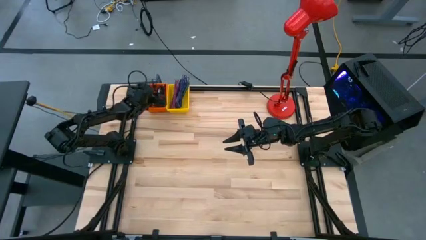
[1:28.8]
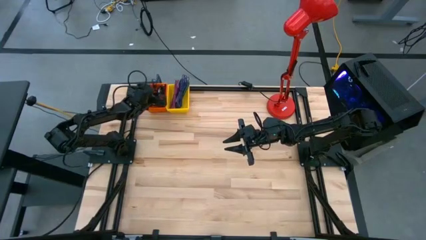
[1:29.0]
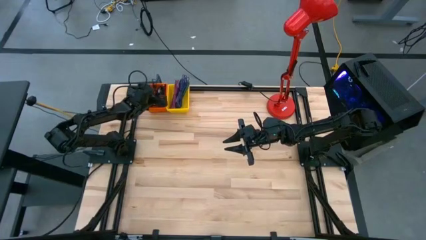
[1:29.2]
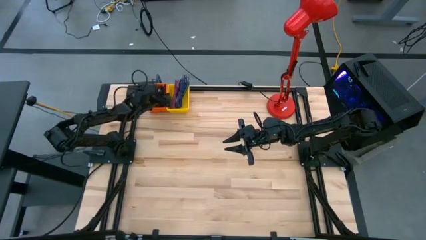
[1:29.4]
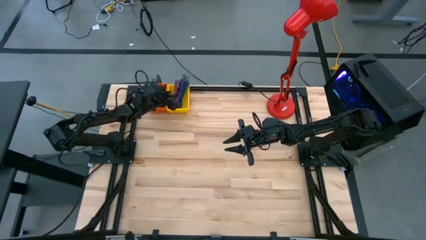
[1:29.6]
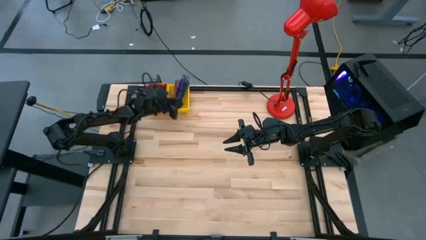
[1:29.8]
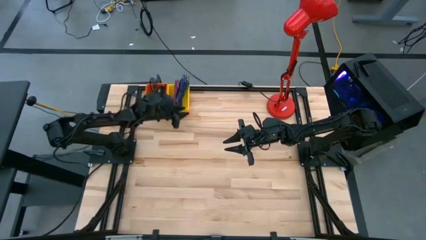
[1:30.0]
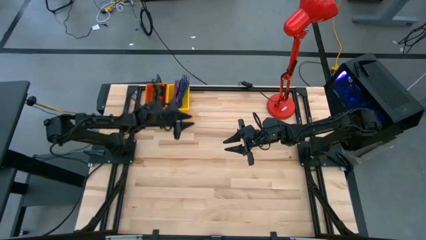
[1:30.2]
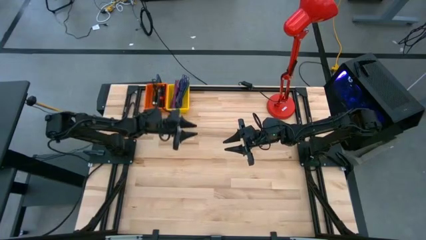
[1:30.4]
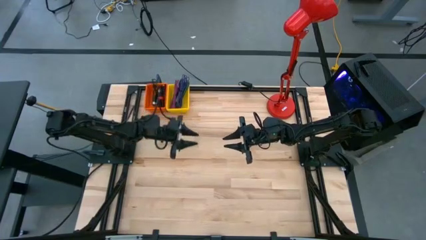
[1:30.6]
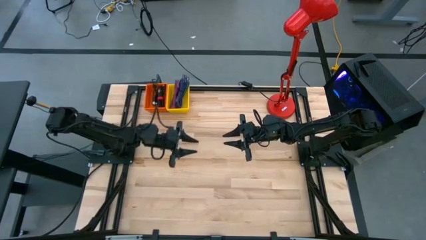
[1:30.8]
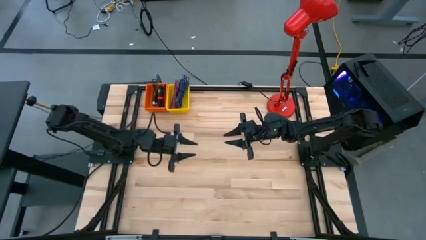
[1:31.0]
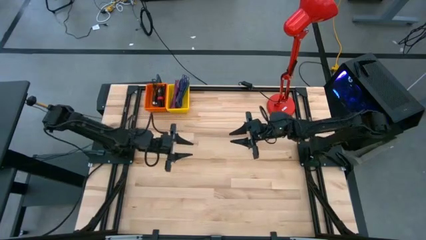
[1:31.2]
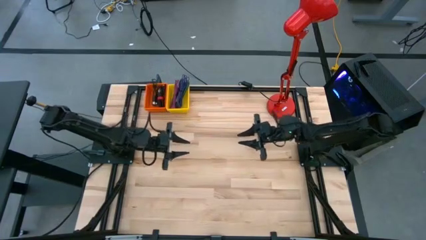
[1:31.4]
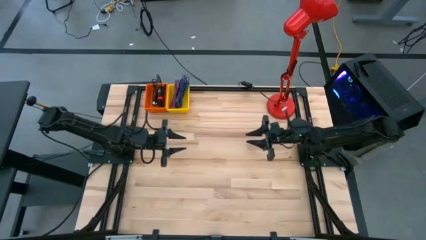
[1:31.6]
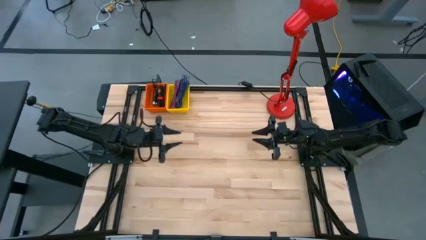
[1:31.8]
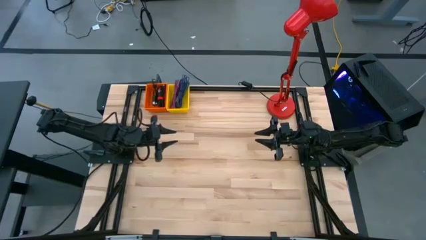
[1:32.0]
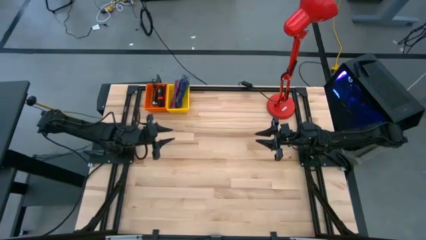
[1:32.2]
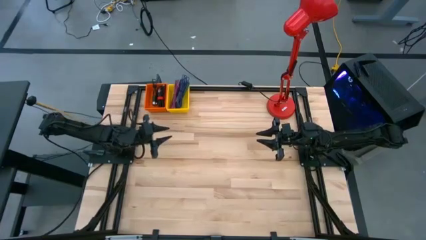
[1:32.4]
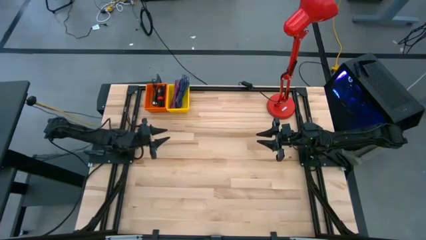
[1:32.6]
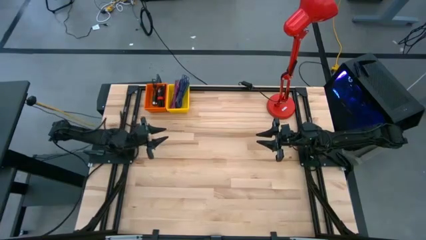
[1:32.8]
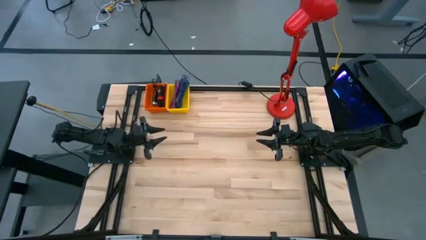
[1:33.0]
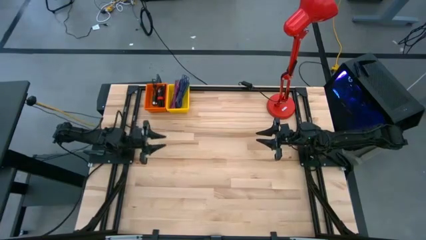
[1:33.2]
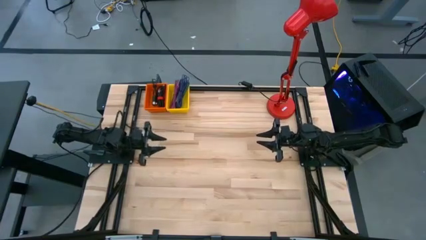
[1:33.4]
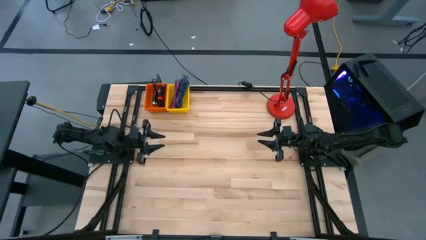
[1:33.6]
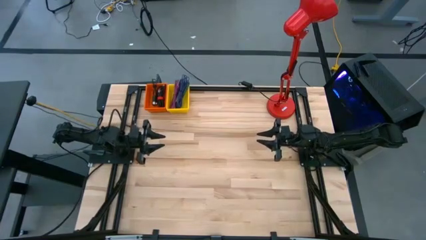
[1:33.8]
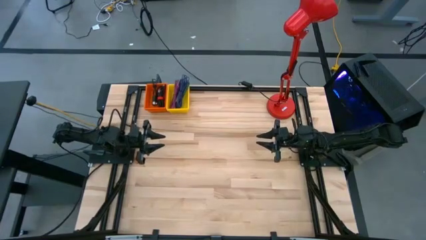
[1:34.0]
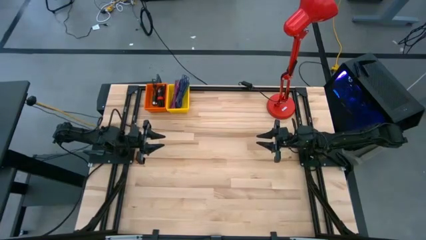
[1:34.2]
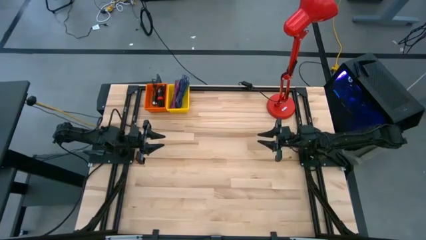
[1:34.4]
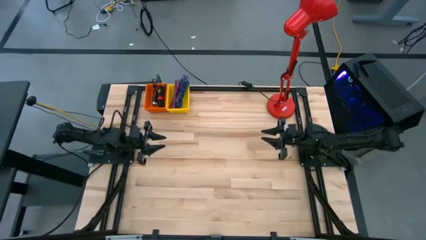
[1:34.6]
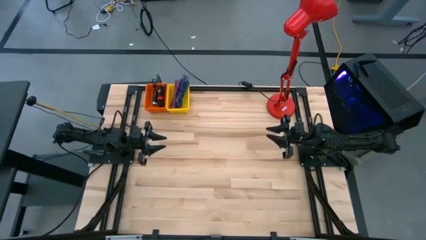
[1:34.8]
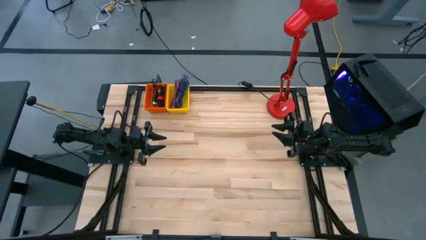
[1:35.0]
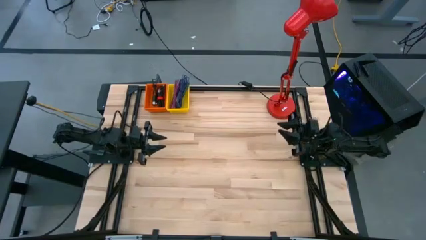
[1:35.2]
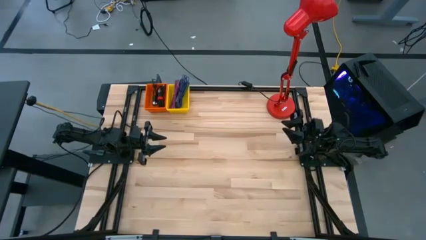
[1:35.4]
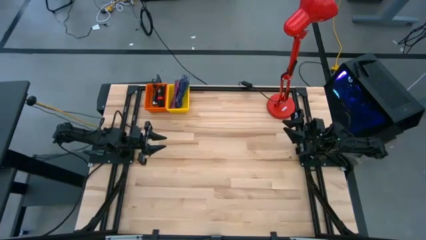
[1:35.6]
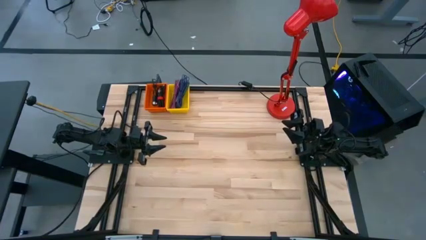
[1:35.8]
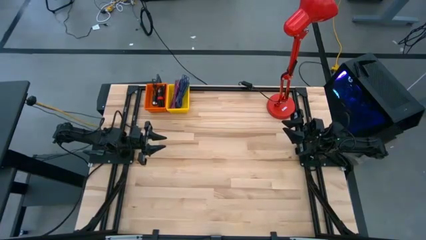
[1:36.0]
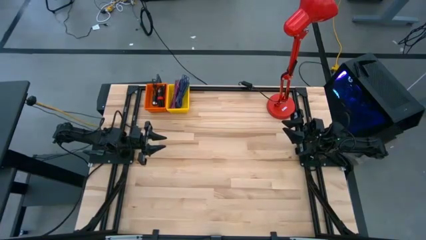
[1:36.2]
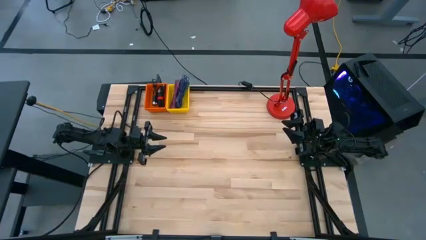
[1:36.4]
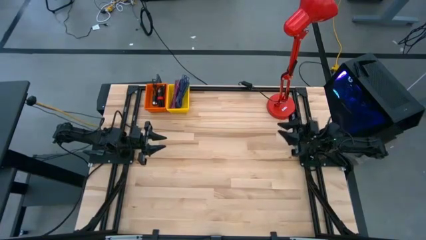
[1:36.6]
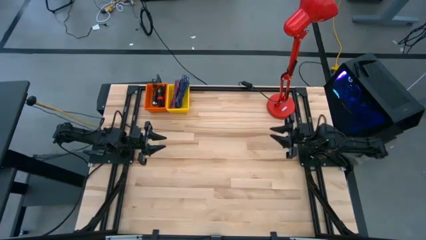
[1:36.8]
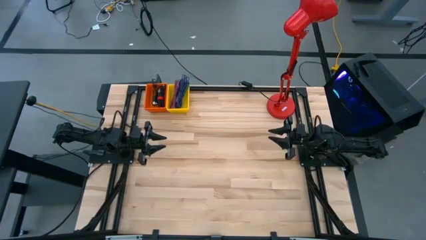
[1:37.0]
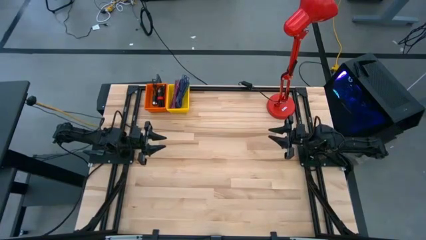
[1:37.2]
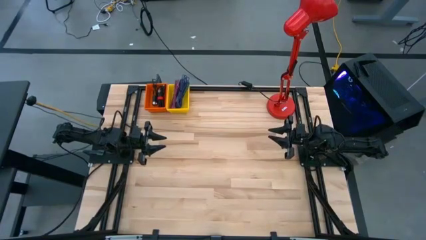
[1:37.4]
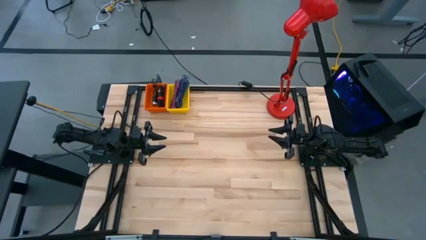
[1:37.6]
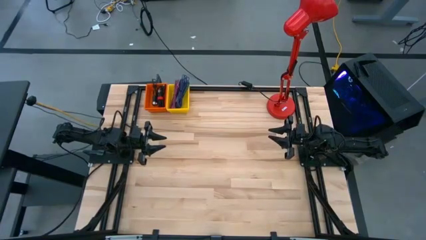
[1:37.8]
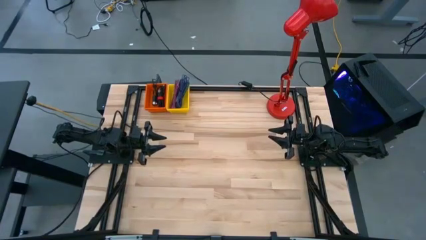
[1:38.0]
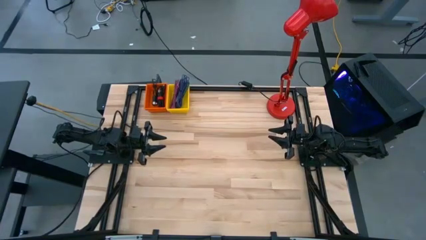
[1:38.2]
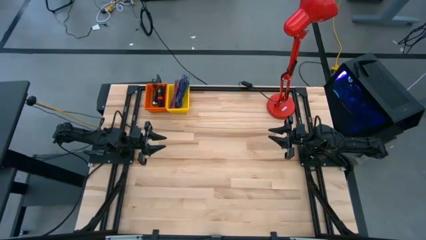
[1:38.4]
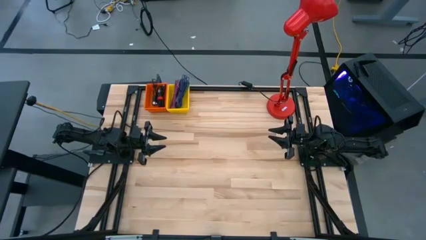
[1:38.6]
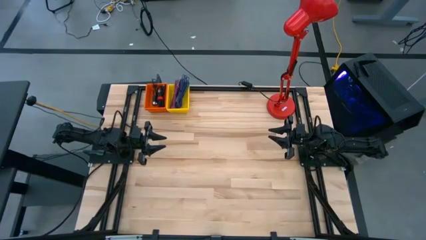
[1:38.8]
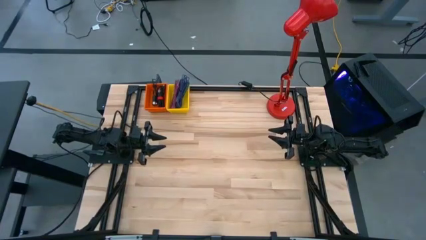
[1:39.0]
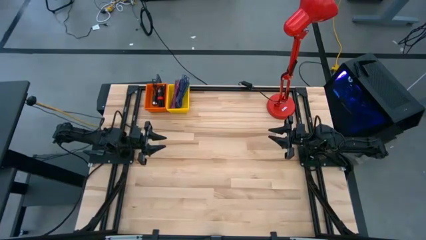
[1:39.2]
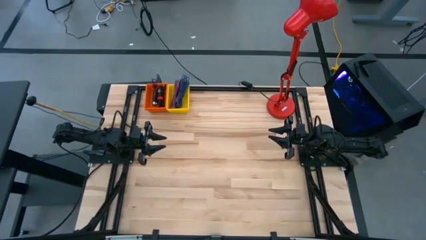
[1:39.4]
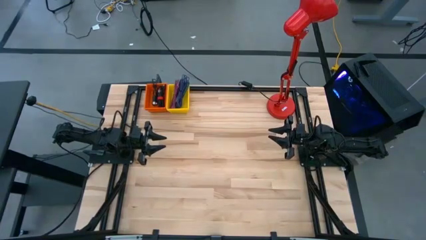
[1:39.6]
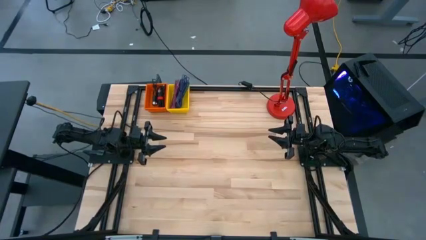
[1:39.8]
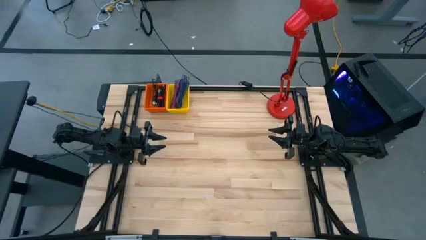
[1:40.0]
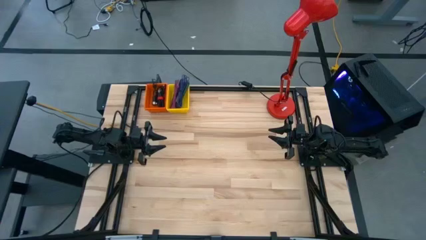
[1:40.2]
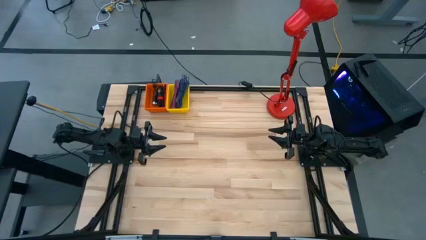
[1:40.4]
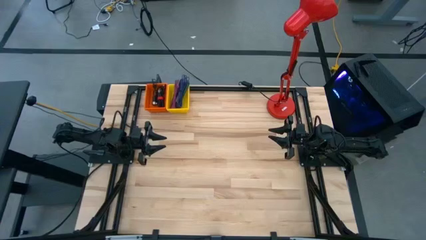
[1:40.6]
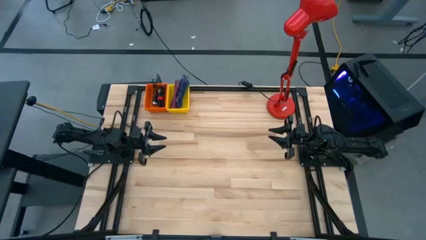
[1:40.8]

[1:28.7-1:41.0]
Task: Pick & Place USB Port
Return to Home Position

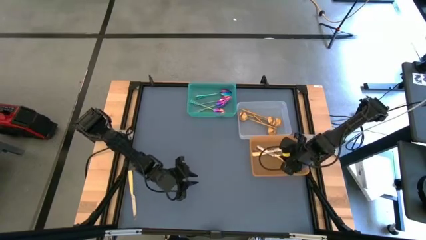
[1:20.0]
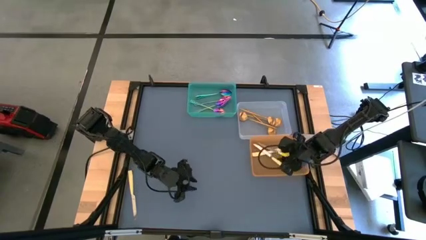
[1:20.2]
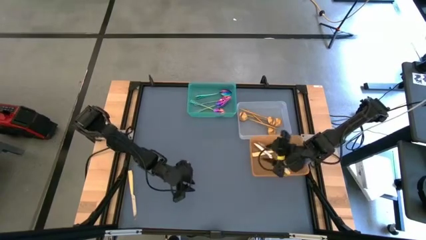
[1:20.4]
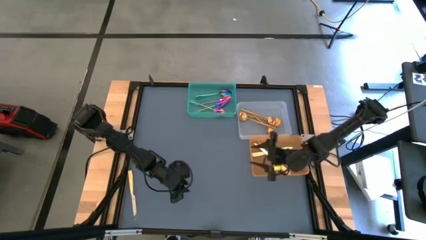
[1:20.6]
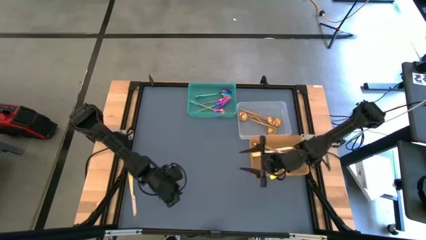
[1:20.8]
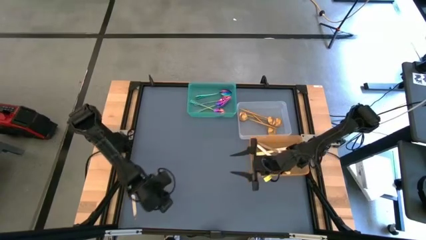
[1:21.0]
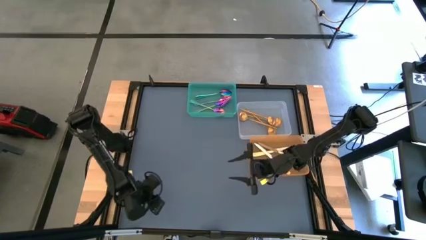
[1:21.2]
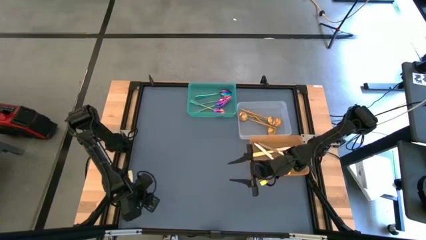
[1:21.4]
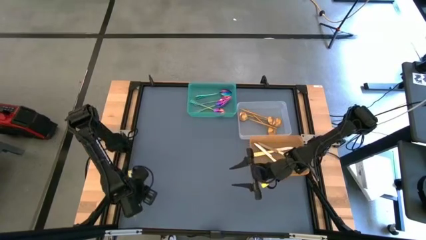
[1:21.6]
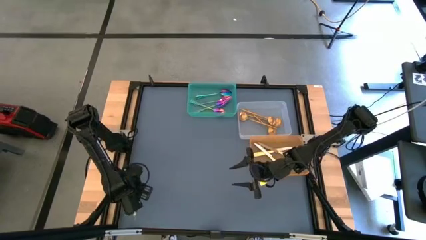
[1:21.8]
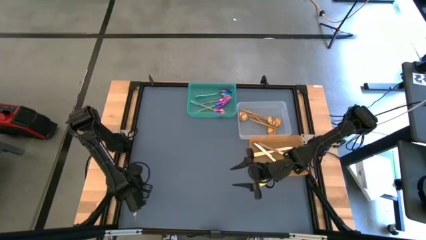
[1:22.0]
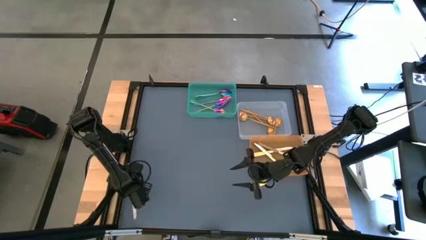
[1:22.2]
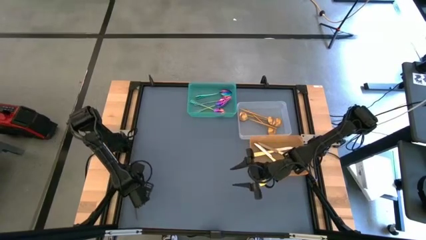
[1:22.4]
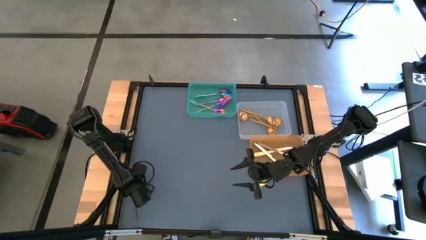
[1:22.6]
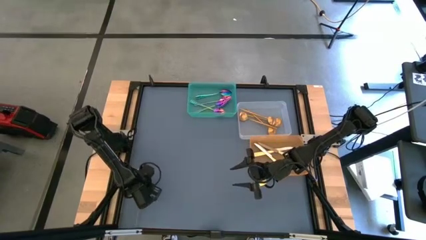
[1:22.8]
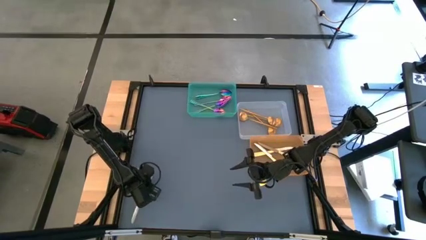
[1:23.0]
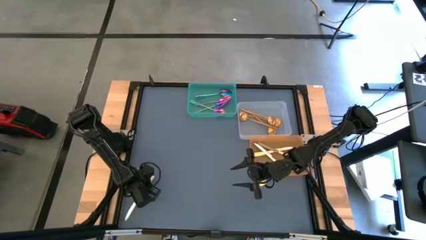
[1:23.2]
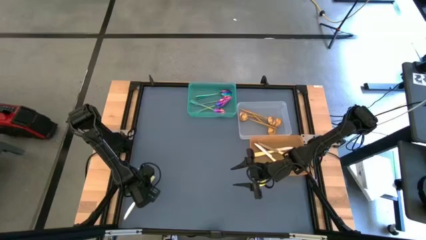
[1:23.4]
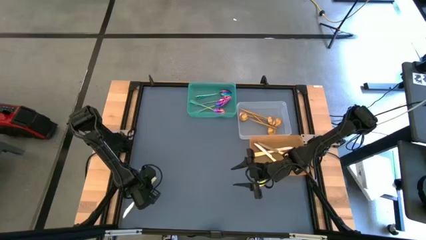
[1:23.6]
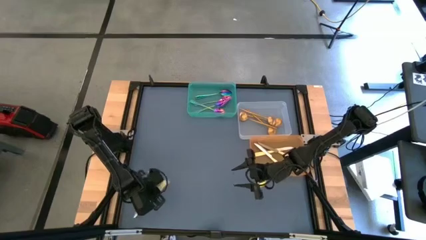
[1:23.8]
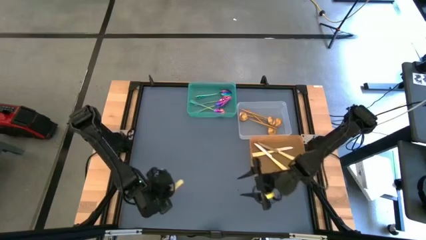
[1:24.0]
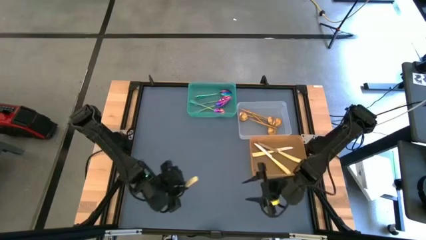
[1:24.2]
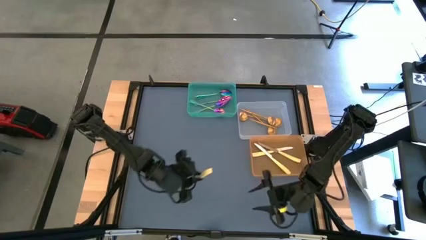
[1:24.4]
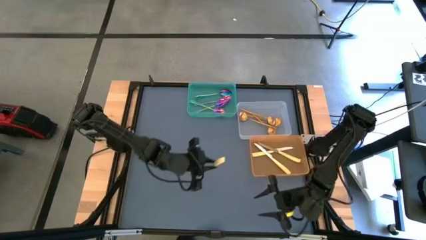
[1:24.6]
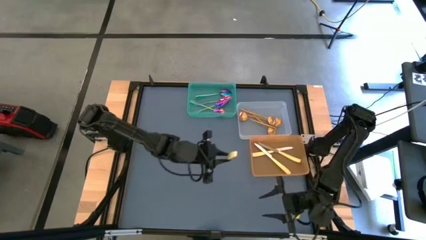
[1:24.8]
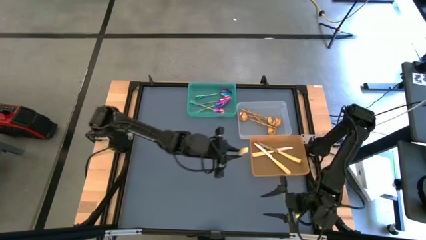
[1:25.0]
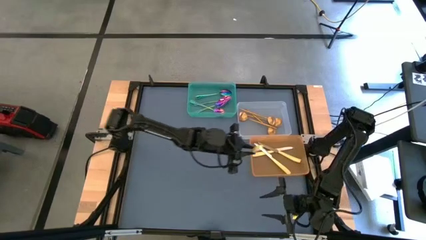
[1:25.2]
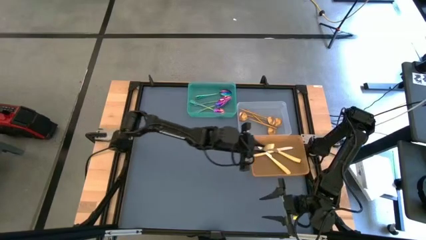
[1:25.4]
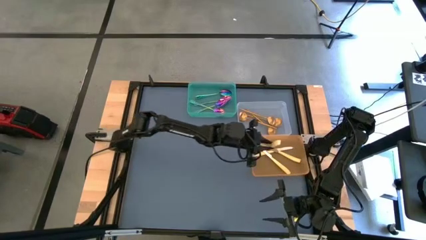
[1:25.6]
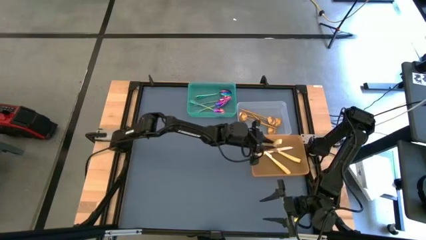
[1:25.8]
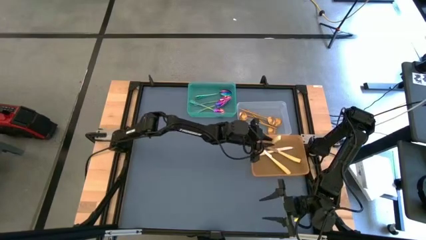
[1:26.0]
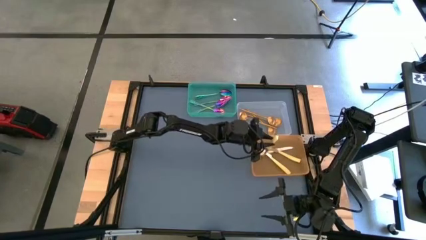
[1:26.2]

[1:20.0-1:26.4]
Task: Sort silverware by color (type)
Put the table knife into the orange bin
